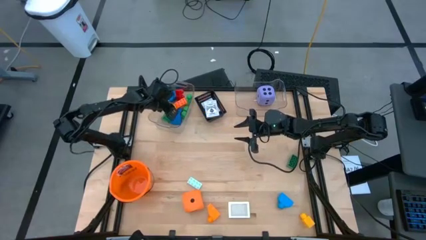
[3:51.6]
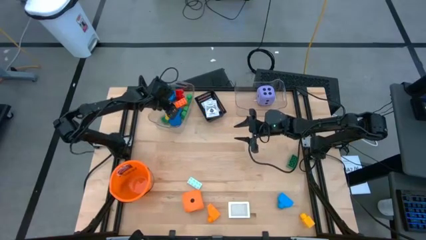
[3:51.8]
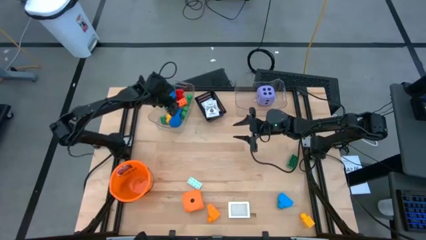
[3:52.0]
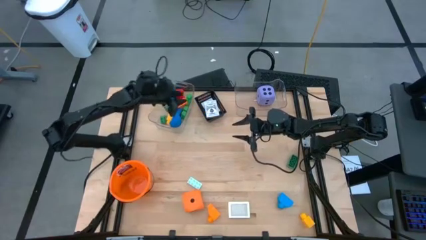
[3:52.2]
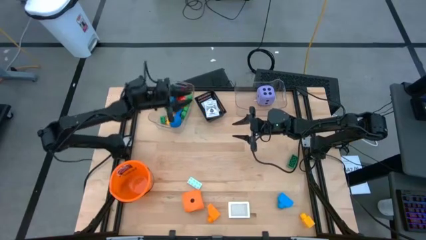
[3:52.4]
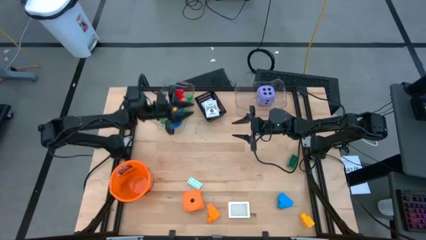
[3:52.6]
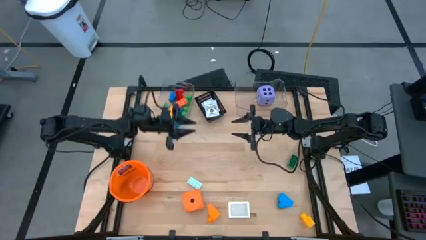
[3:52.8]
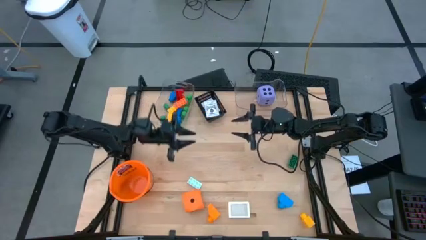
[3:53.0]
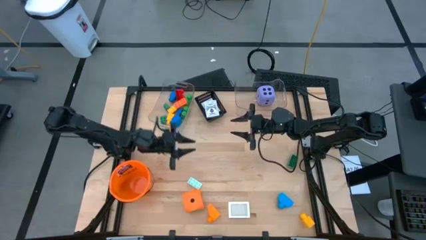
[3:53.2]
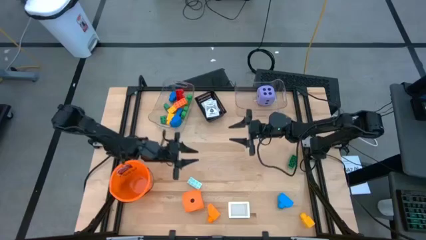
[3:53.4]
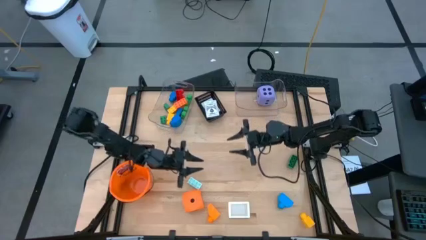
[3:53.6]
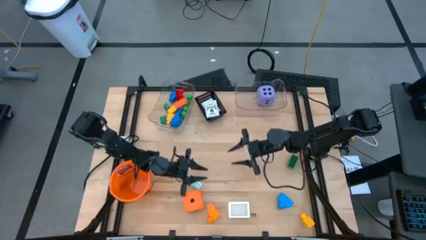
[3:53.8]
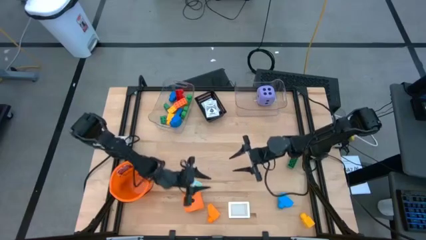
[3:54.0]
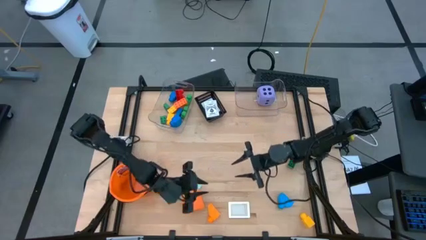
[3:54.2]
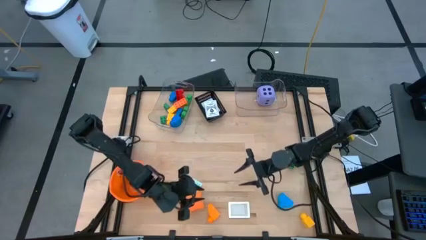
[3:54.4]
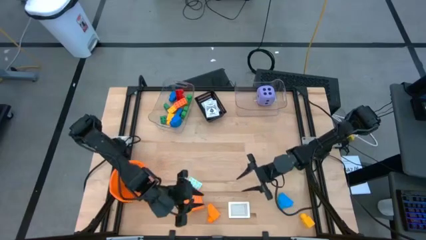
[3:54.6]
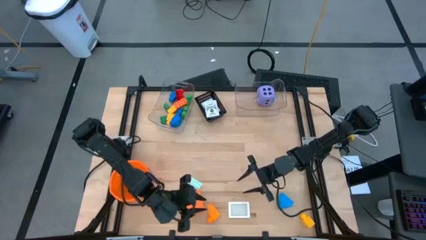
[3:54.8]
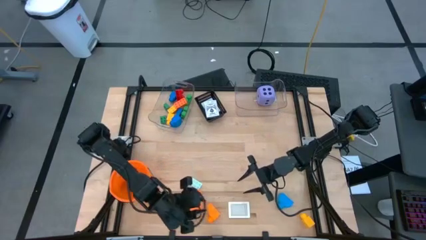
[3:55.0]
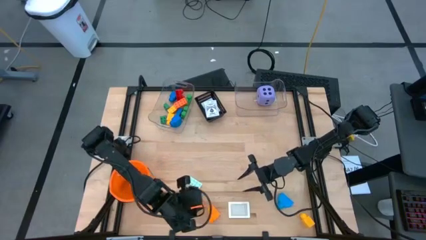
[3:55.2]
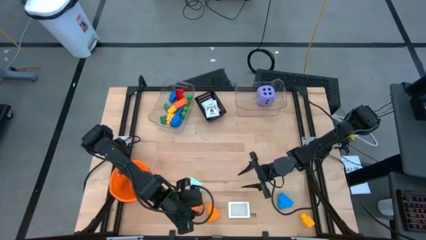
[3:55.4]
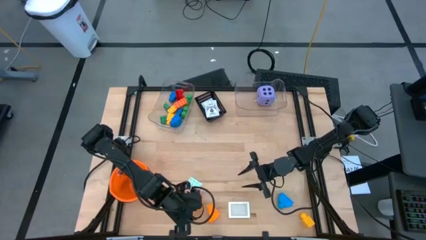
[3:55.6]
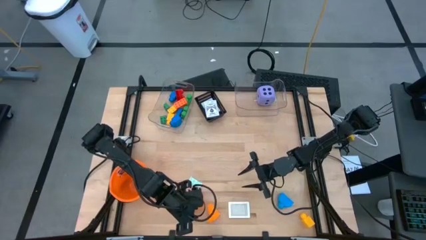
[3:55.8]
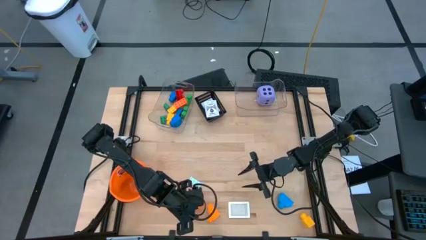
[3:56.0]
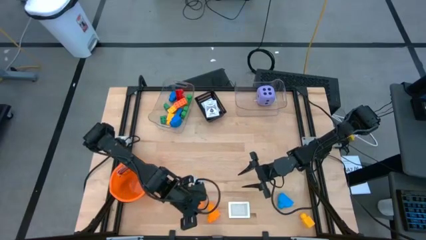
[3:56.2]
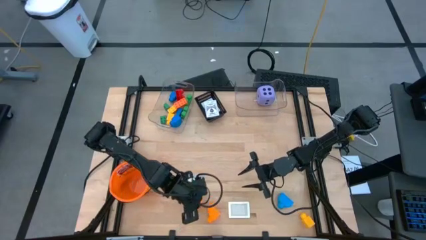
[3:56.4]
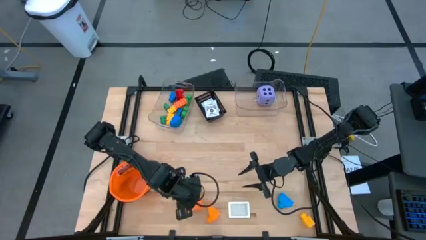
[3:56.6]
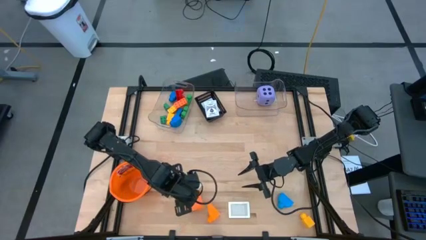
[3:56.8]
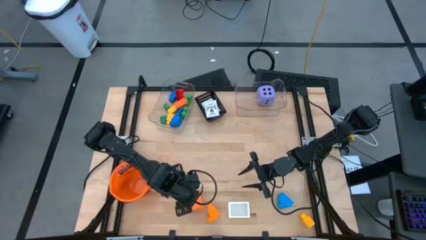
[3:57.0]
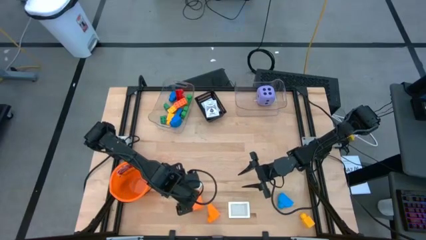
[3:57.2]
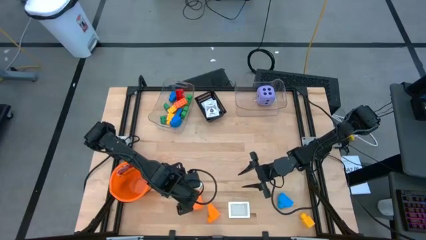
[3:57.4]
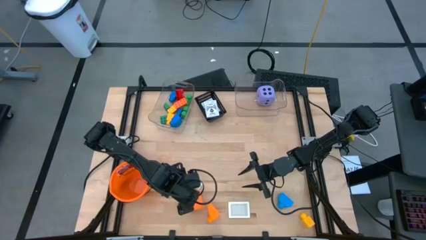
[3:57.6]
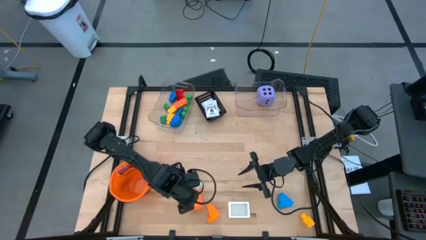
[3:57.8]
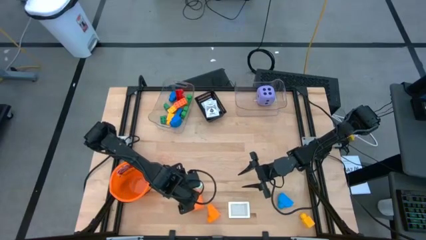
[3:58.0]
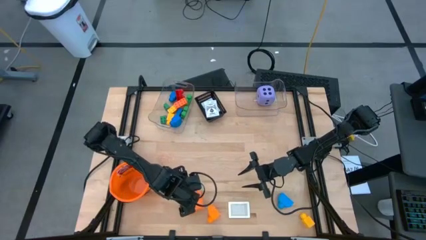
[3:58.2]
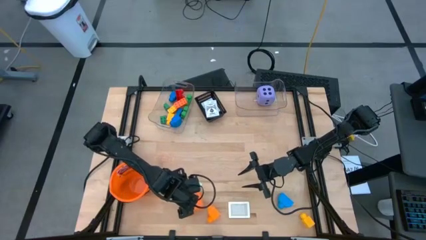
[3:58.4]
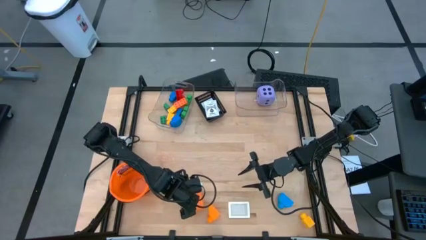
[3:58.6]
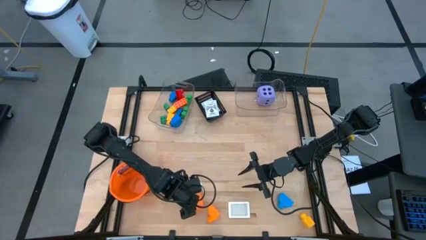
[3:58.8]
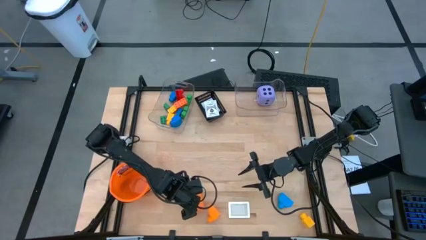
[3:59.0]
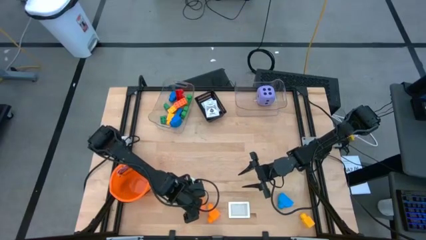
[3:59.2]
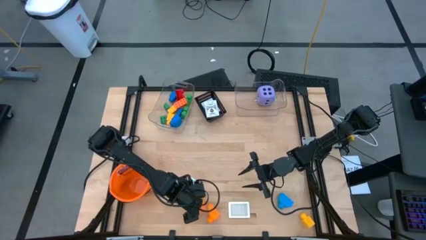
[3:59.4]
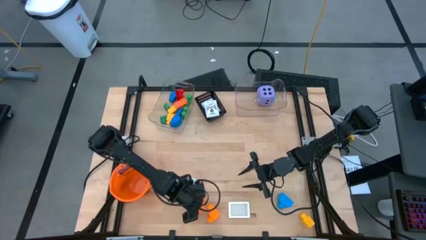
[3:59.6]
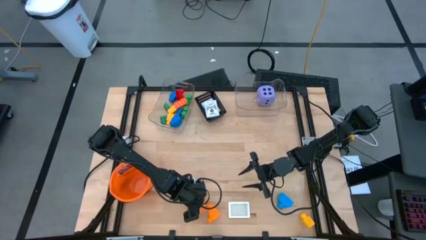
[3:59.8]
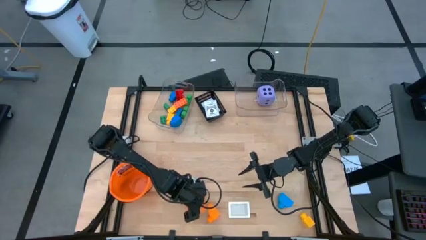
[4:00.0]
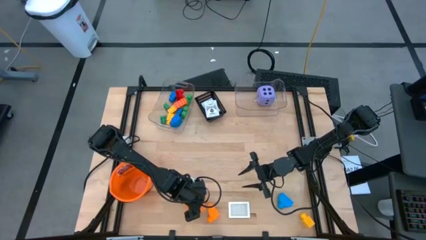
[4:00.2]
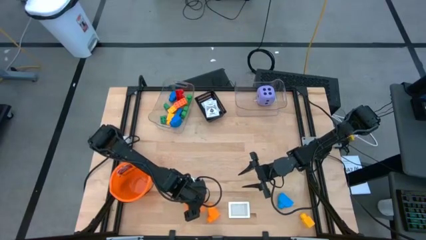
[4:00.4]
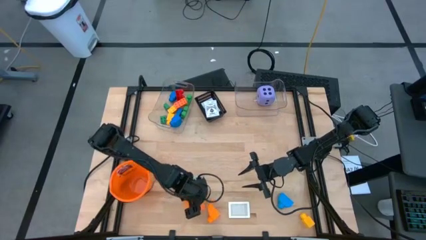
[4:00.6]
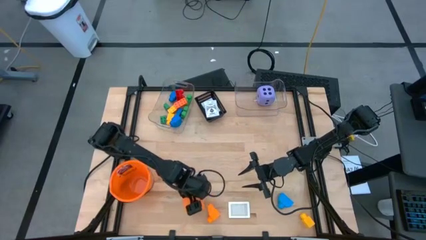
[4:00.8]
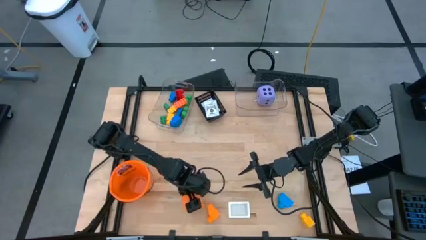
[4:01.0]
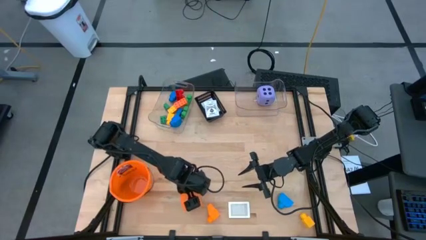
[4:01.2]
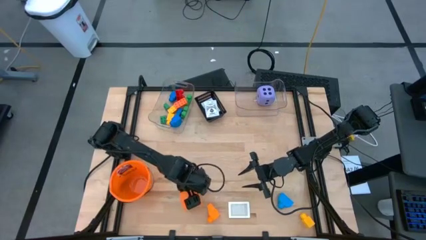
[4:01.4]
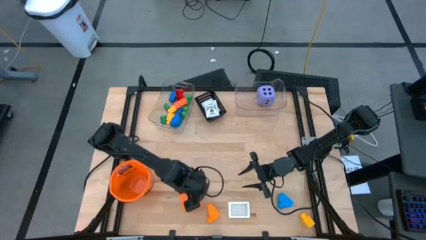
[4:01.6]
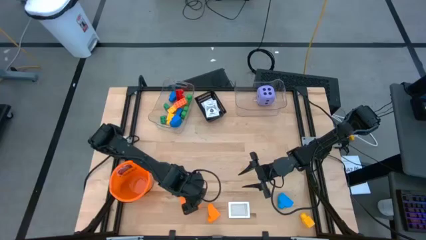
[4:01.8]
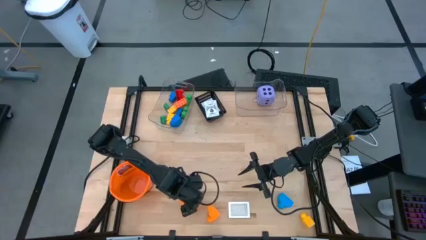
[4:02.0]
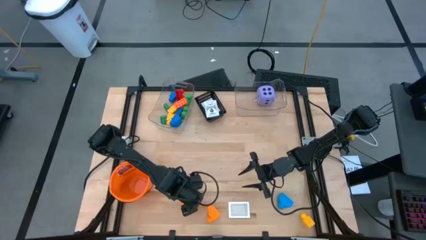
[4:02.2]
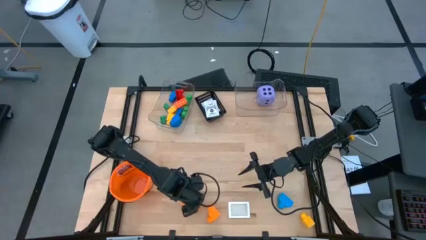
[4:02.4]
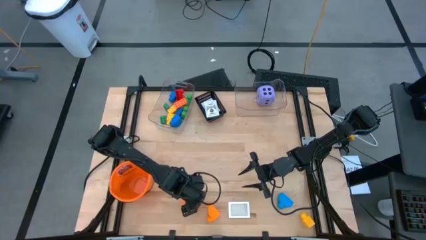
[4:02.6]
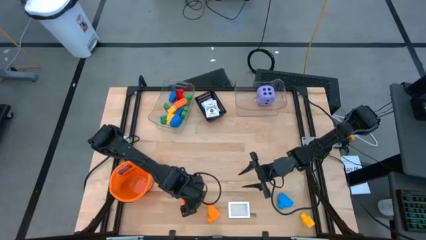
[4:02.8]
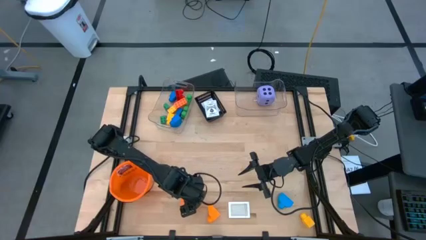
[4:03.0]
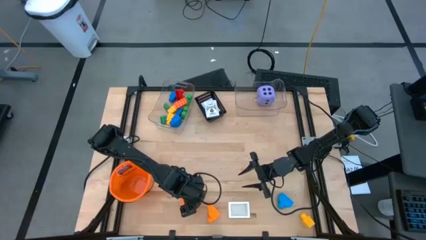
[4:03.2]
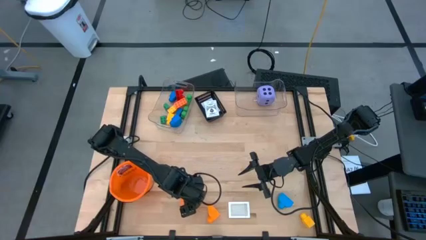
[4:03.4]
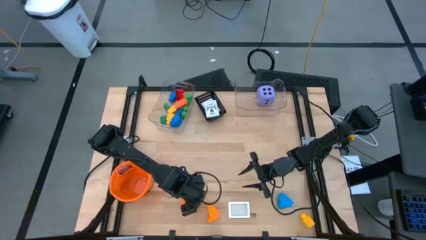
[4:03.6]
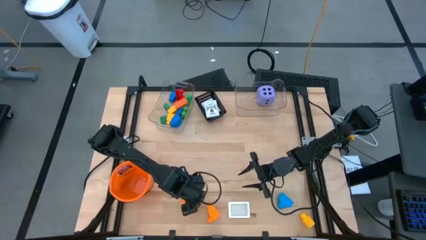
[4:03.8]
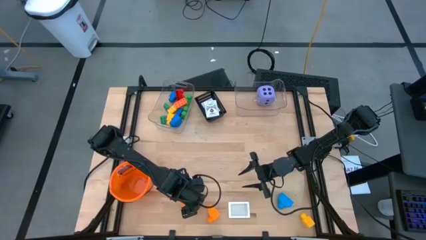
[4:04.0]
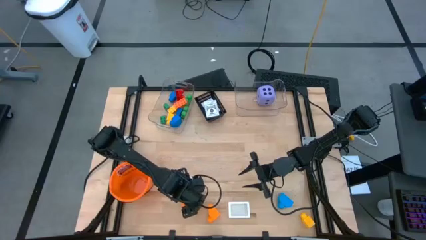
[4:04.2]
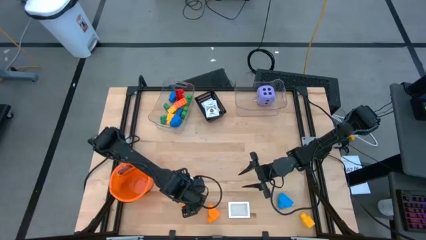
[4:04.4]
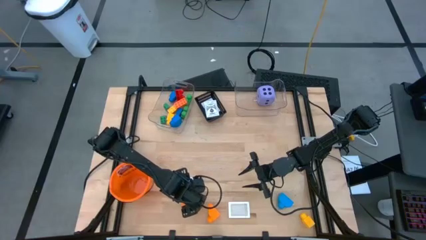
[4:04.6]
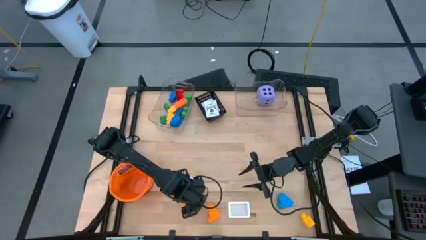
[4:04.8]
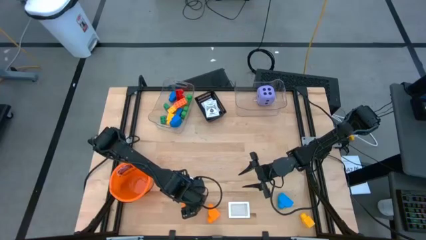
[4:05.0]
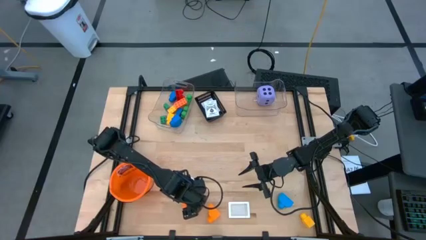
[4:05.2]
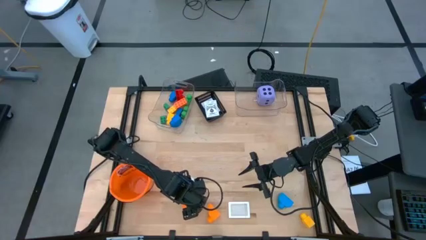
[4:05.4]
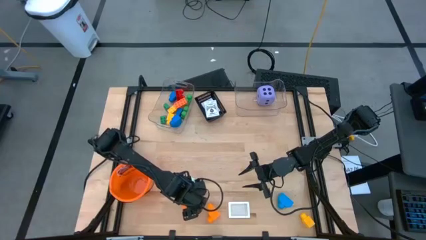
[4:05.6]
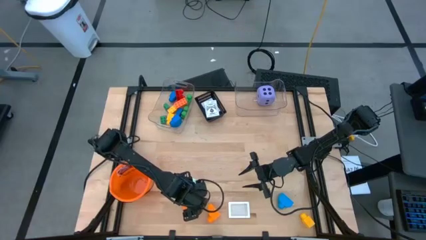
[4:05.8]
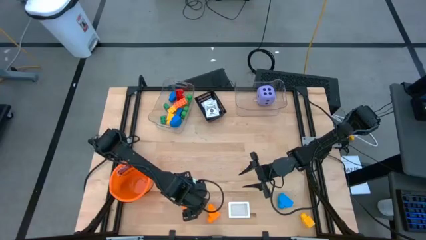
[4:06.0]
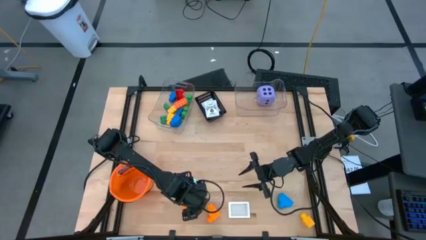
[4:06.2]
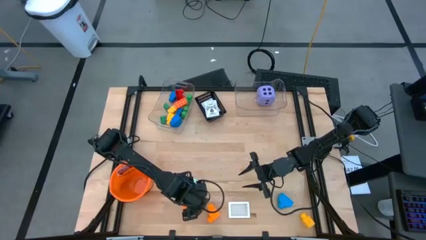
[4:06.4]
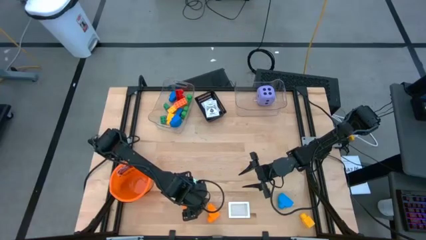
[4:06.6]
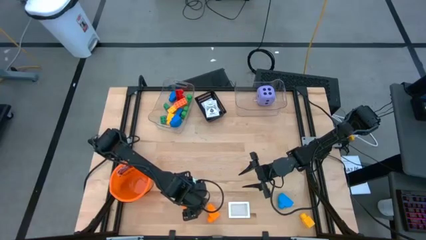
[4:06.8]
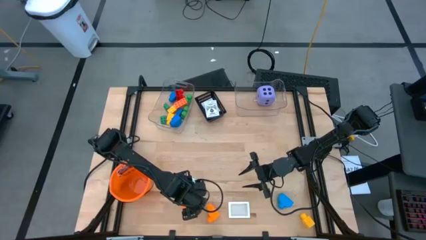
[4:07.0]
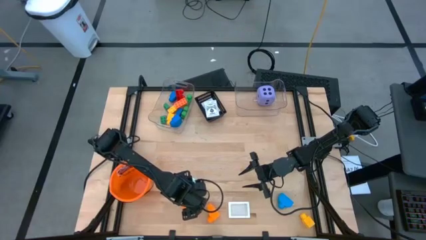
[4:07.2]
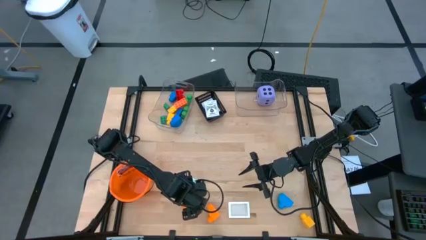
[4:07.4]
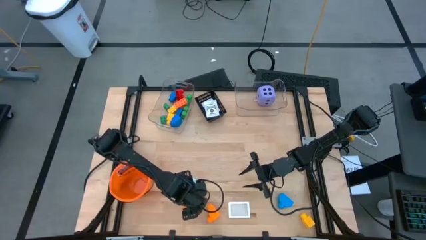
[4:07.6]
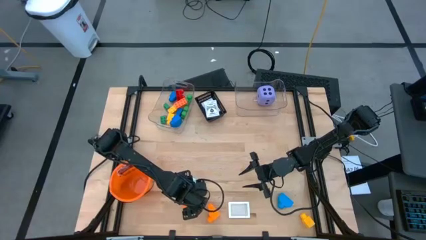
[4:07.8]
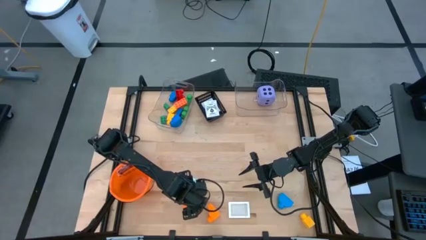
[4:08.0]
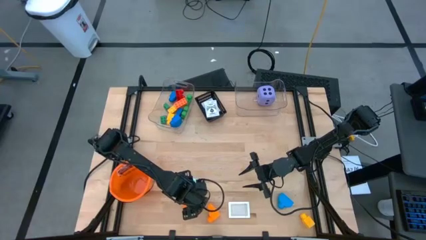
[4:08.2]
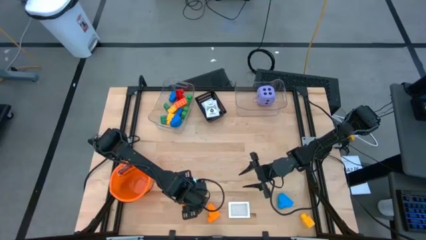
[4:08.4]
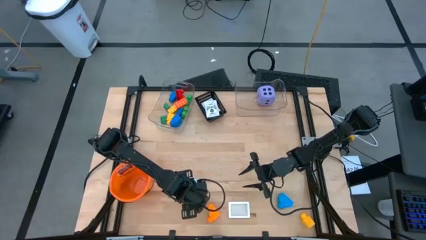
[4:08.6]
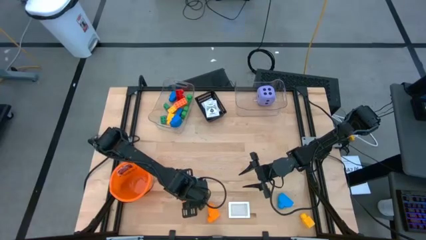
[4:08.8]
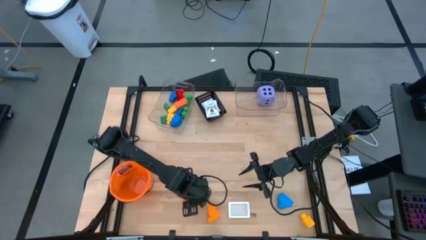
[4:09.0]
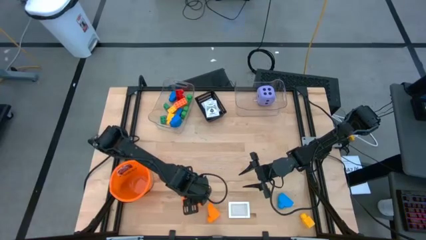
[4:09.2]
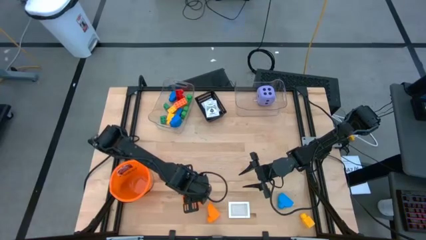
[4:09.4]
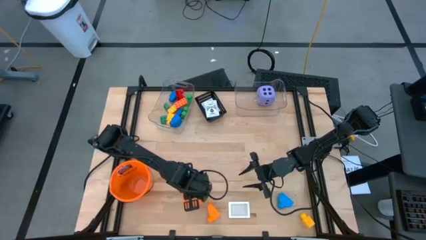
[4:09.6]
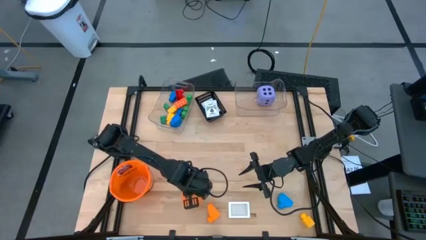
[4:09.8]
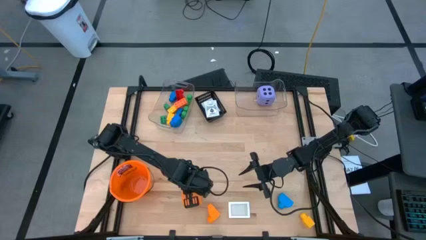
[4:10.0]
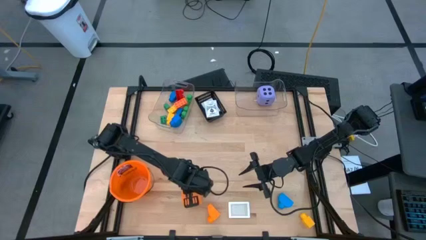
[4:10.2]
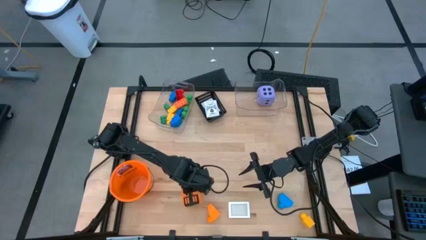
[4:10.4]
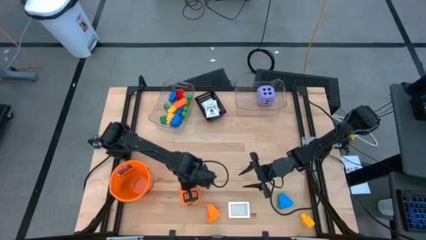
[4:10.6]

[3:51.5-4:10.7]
Task: Pick & Place Toys
Put the orange dice into the right transparent bin
